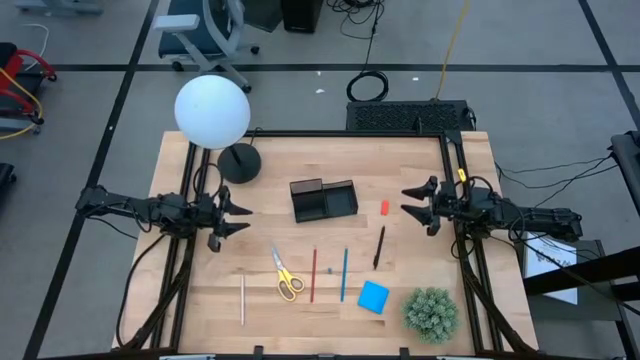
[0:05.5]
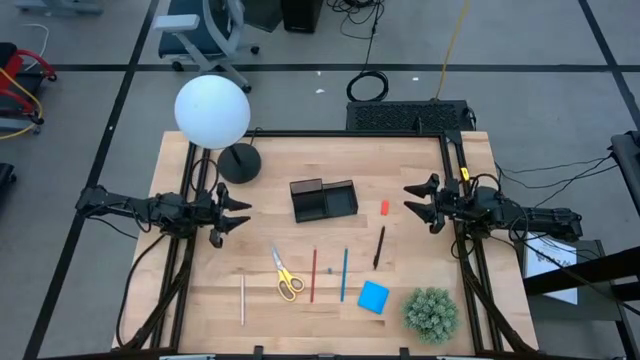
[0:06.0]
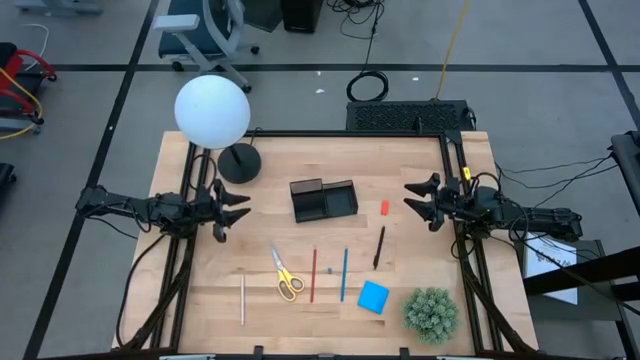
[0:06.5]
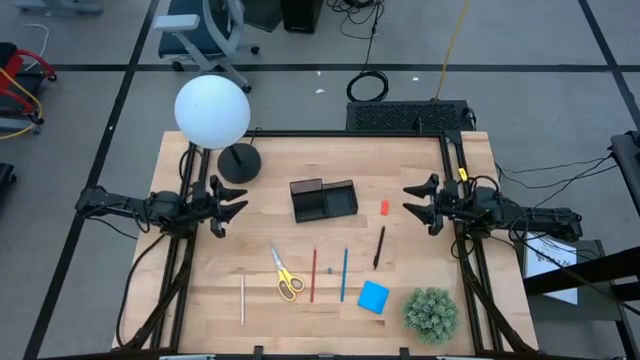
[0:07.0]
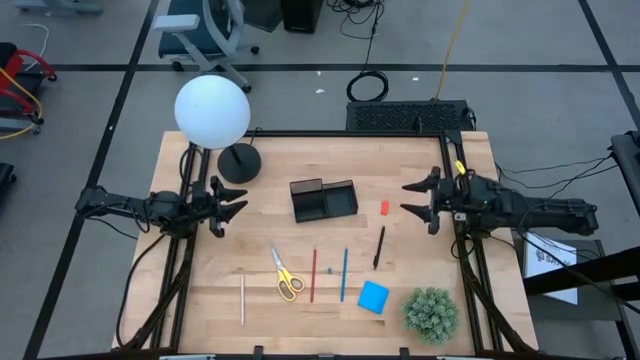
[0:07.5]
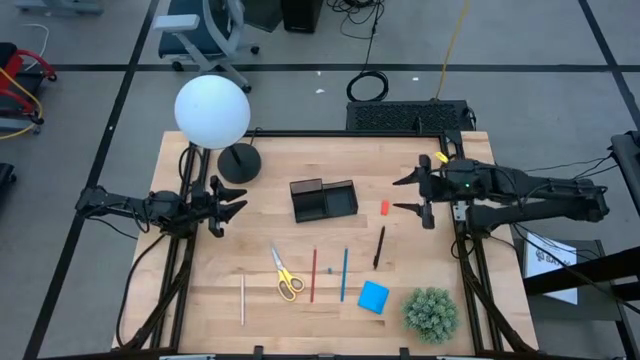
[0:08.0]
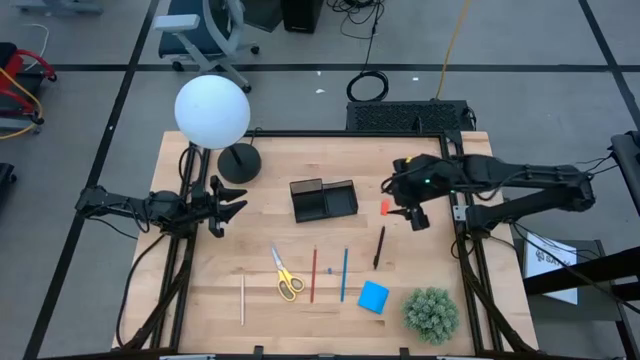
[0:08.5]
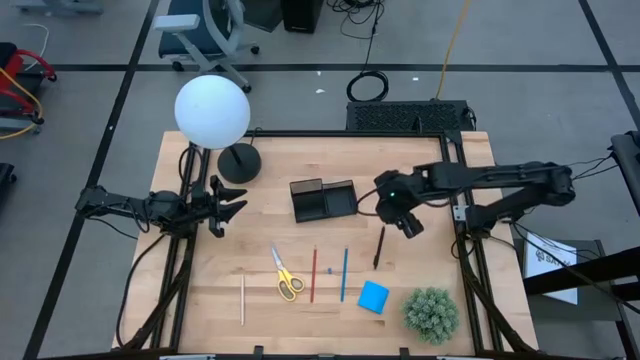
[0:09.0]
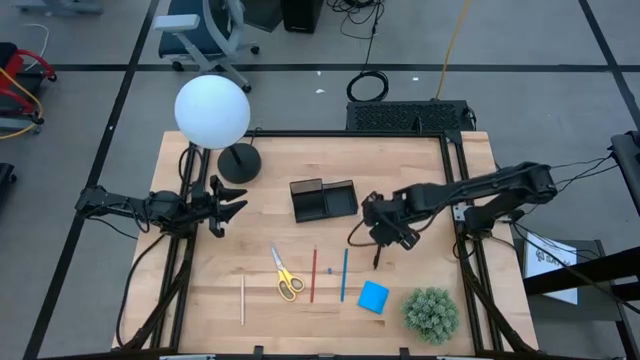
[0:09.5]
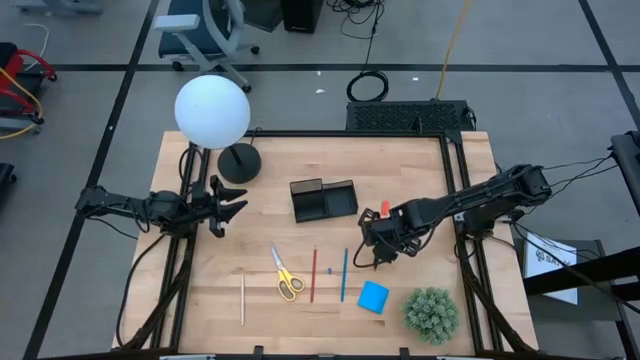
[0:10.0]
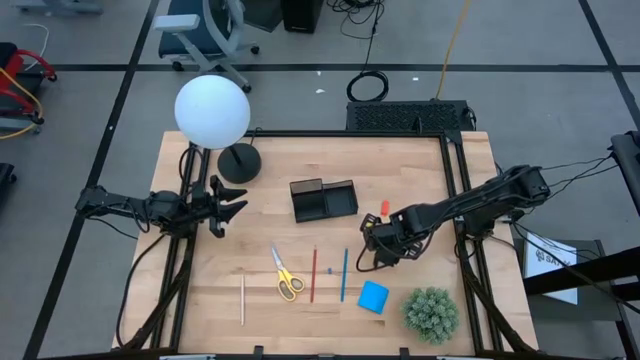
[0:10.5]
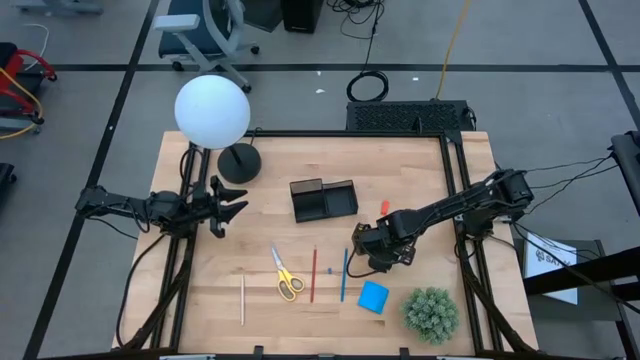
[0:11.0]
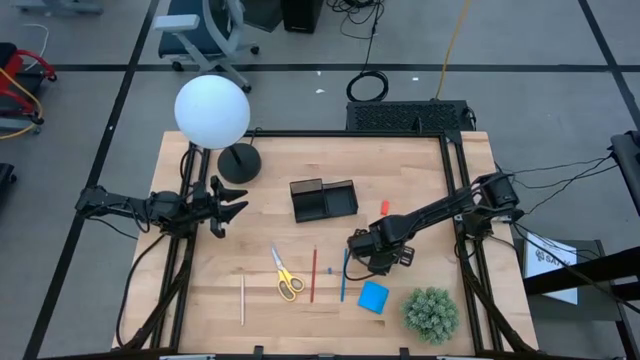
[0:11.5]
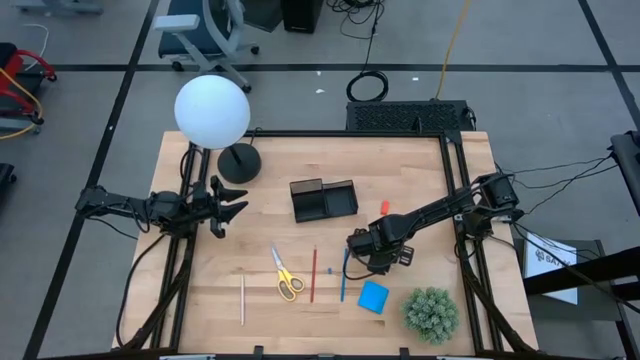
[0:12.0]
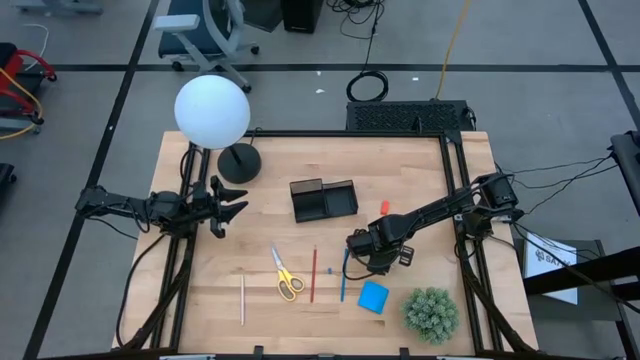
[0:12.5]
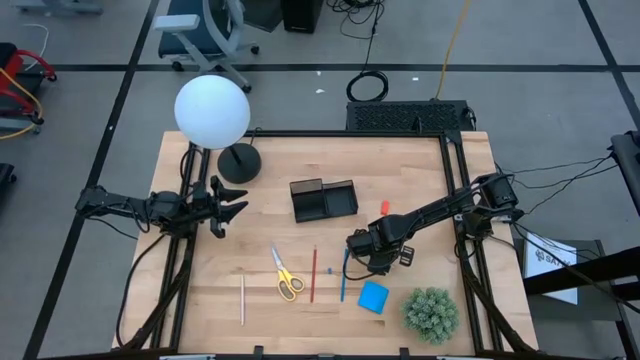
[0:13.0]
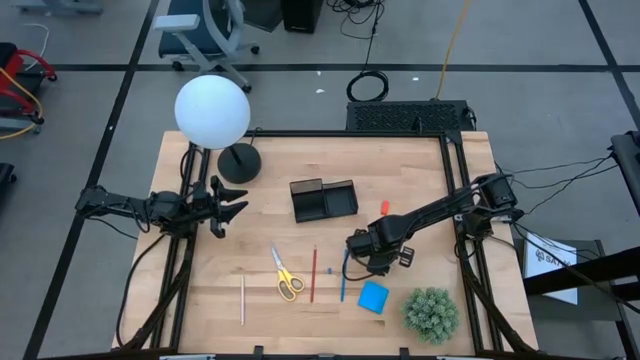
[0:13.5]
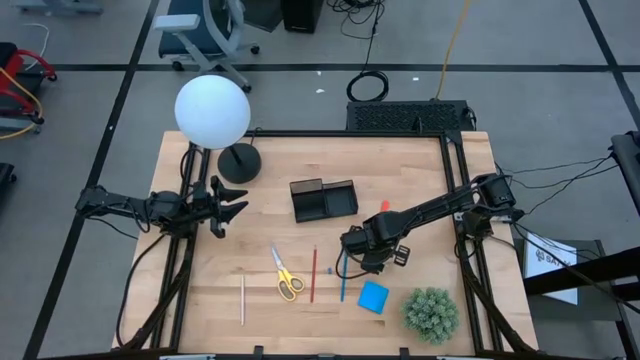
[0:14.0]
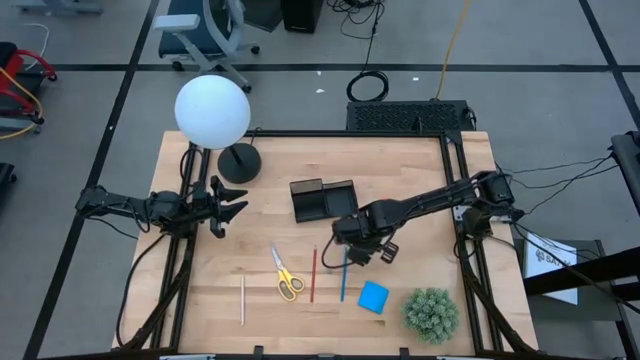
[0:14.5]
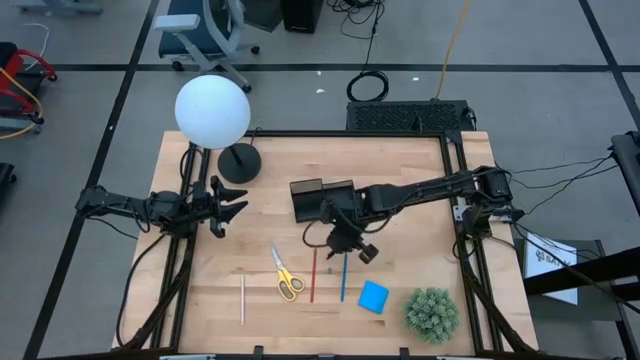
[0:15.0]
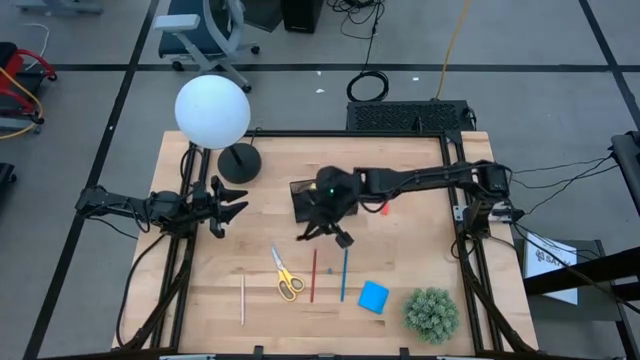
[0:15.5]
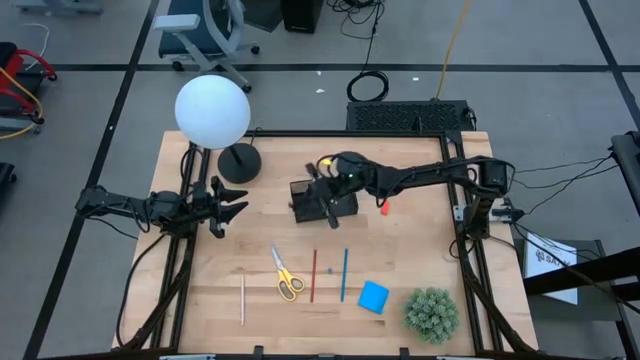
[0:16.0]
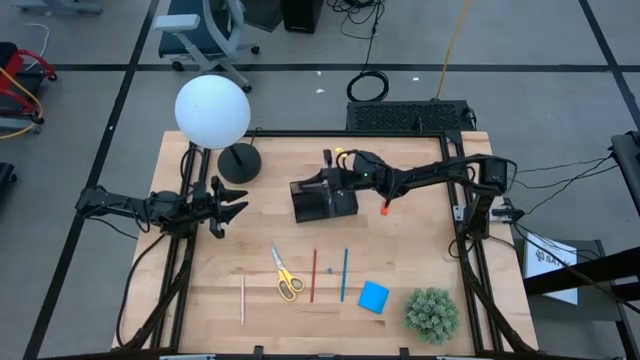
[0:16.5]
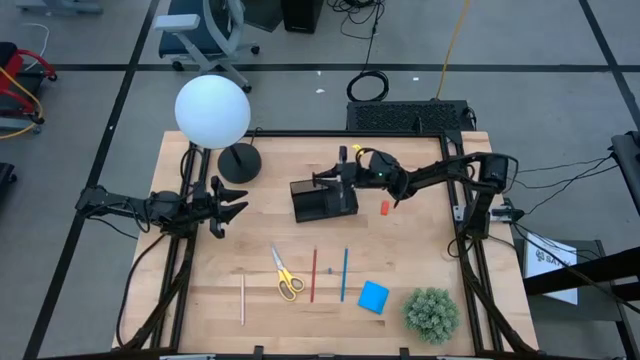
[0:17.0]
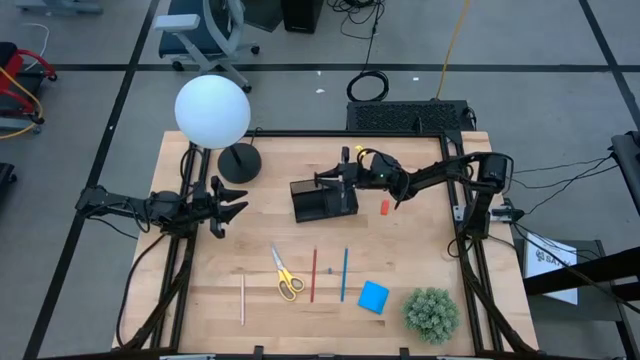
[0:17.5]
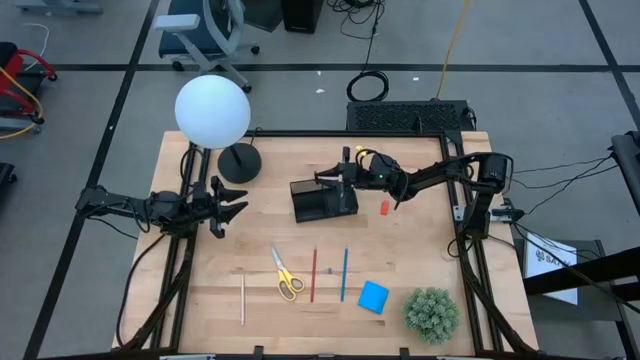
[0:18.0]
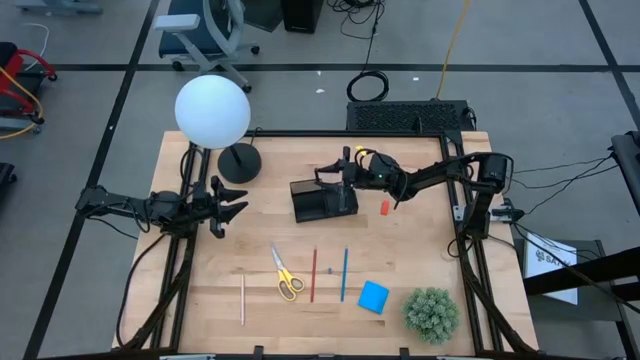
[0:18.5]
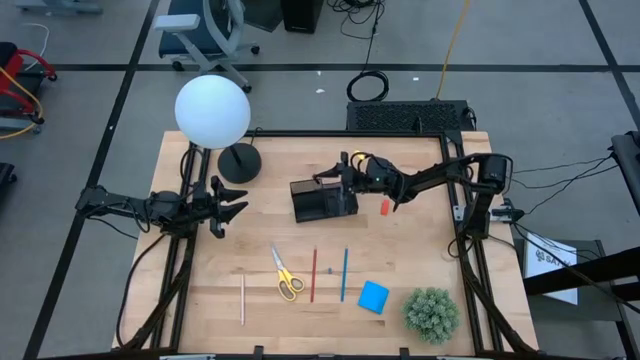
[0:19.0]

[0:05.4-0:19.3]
Task: Pick and place office supplies into organizer
Put the black pen into the desk organizer
